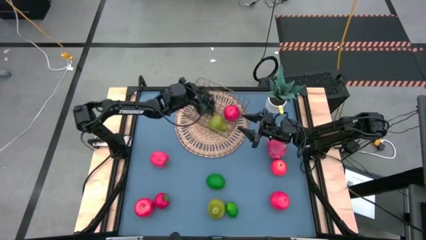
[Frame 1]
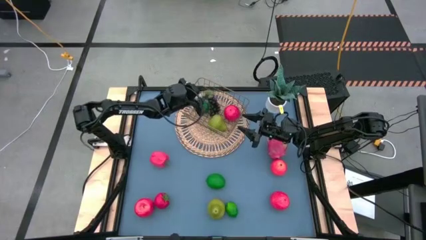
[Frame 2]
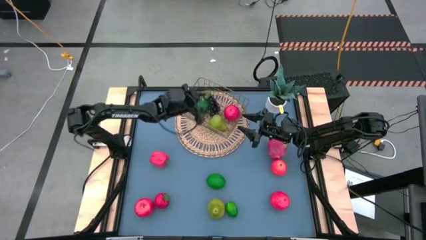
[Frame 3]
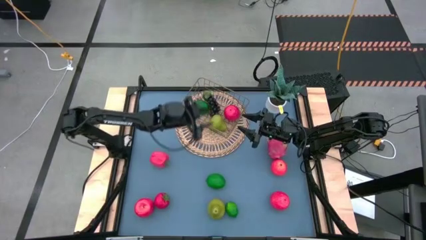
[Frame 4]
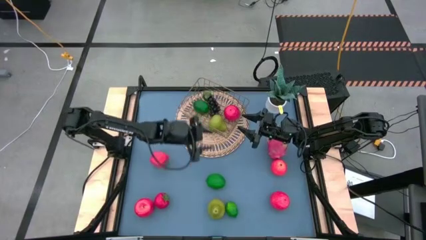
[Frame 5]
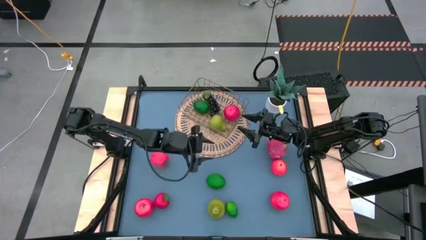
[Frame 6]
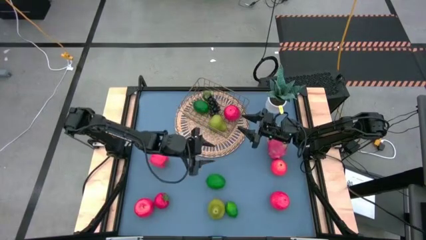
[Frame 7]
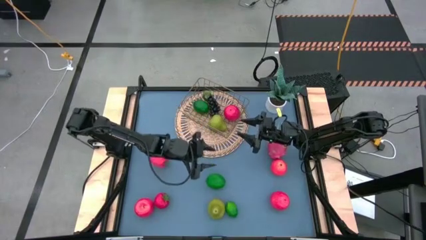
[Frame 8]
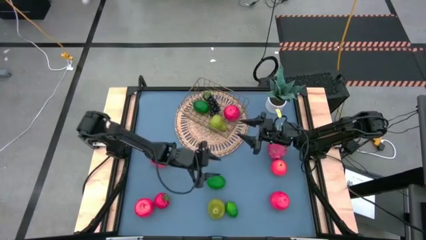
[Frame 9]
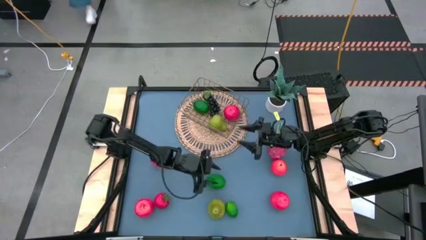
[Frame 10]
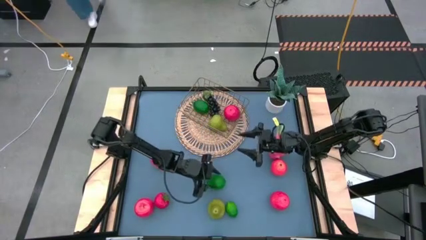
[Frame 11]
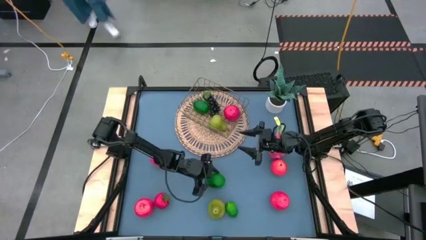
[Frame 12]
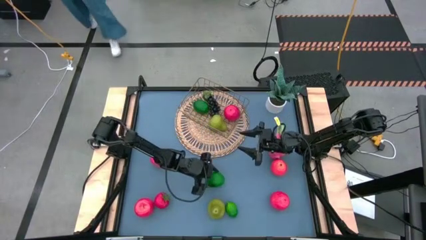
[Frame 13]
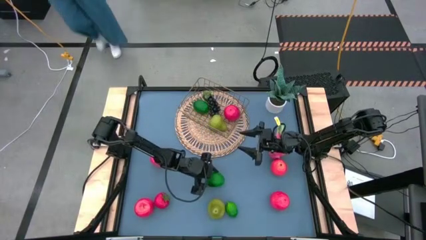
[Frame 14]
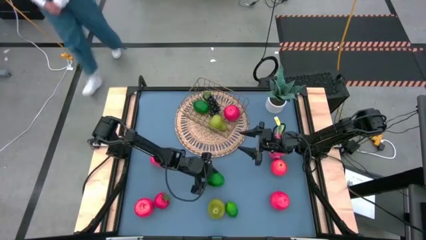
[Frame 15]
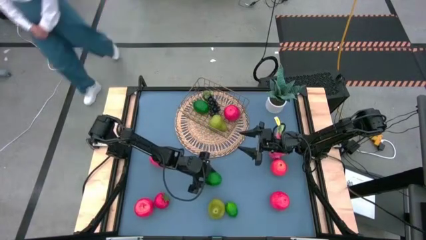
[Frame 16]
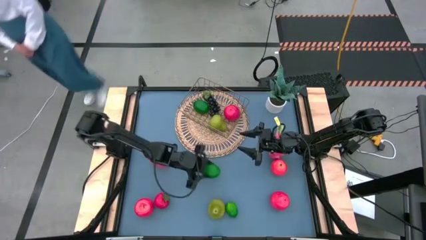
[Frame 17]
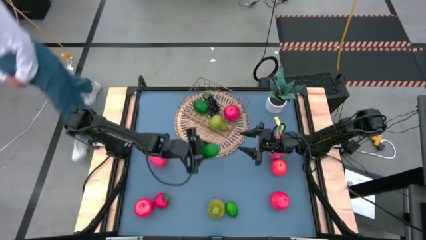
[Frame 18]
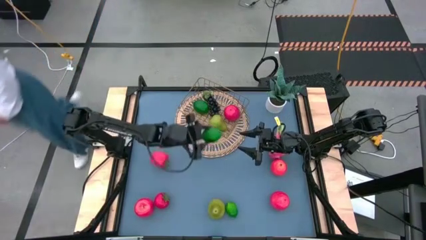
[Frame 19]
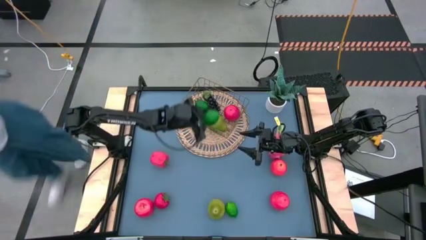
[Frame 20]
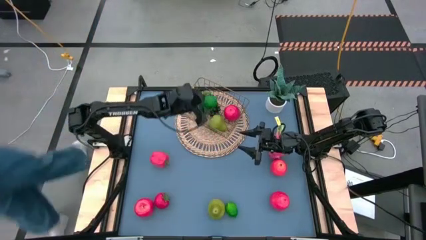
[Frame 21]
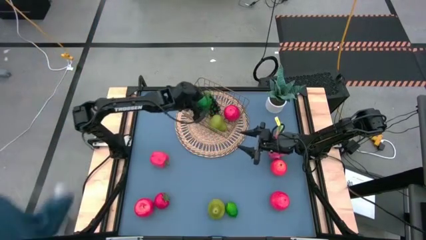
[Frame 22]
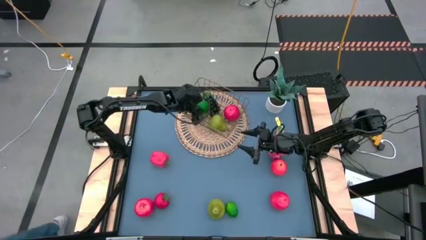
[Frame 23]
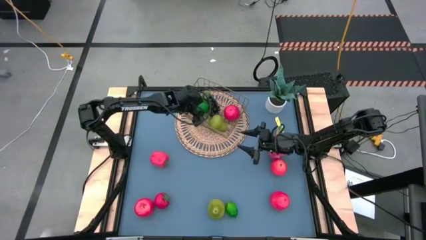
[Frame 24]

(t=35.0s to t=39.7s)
Task: Build produce basket
Put the top green lime into the gold wire basket

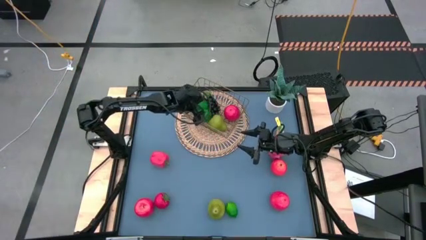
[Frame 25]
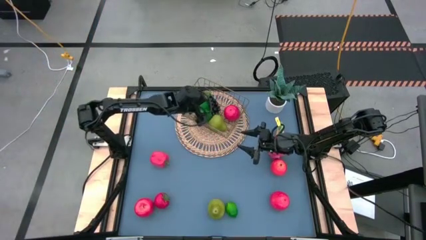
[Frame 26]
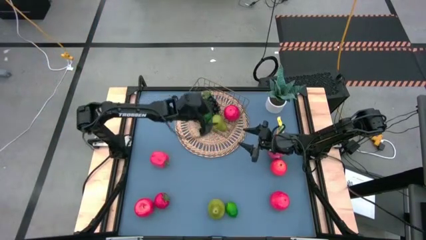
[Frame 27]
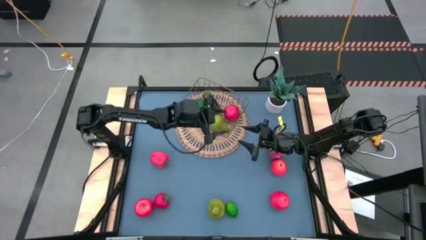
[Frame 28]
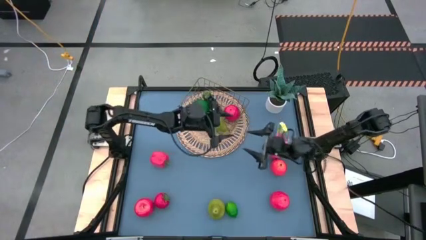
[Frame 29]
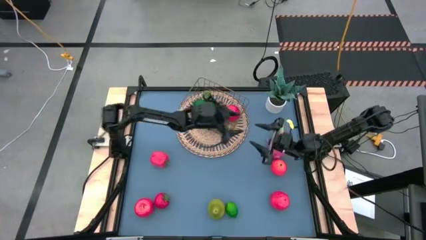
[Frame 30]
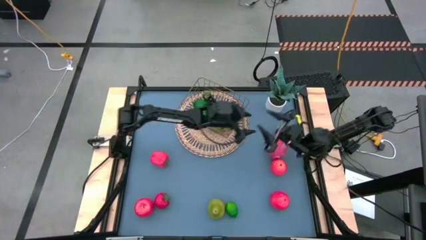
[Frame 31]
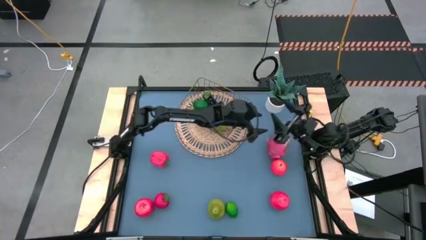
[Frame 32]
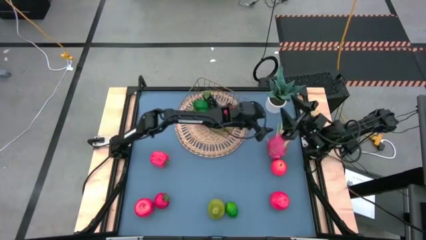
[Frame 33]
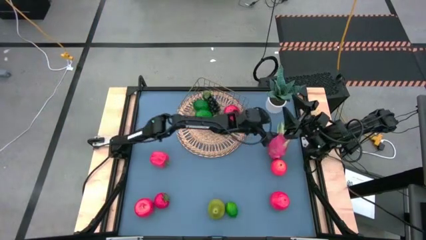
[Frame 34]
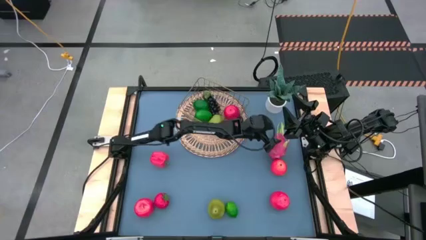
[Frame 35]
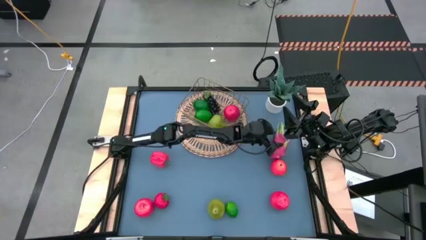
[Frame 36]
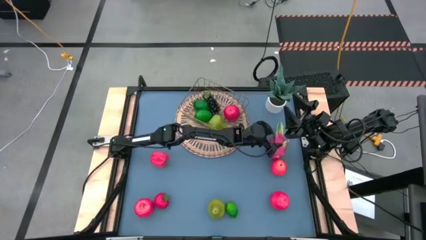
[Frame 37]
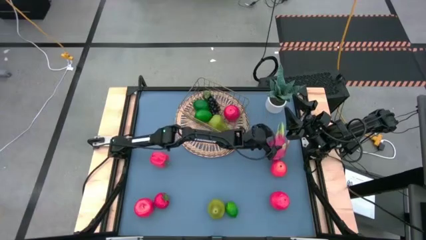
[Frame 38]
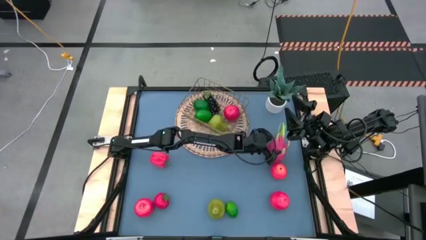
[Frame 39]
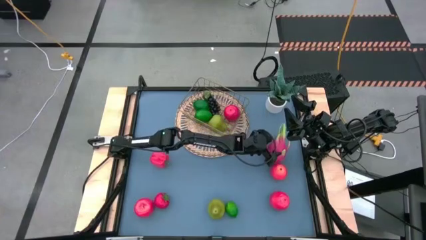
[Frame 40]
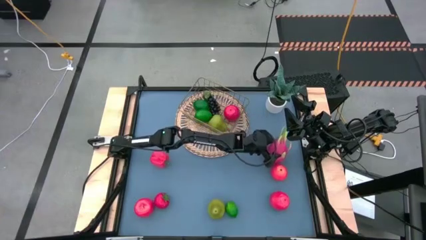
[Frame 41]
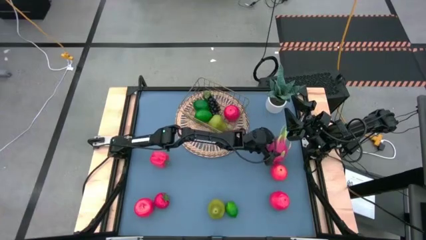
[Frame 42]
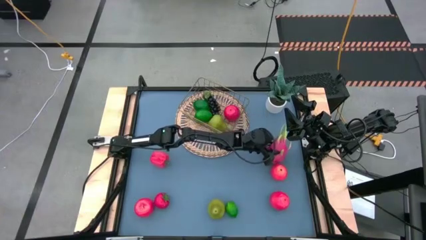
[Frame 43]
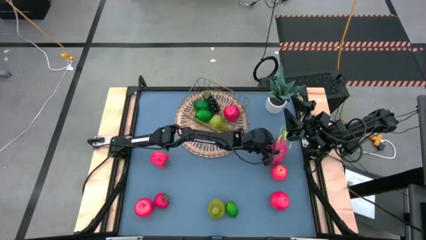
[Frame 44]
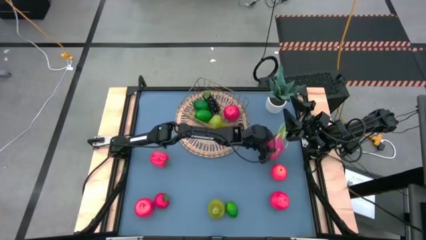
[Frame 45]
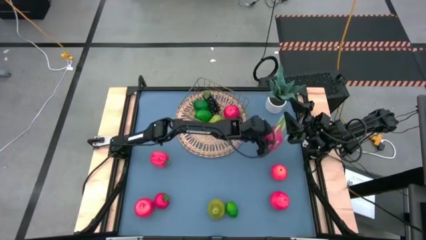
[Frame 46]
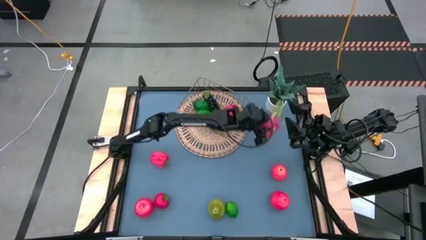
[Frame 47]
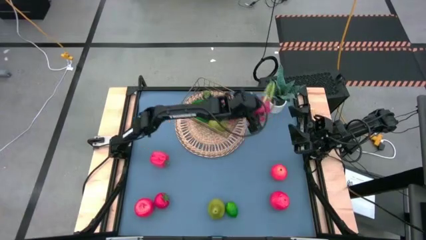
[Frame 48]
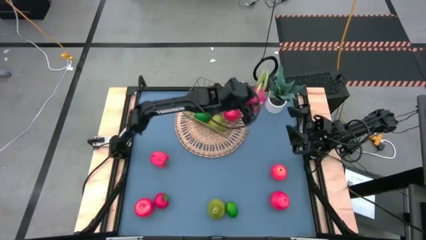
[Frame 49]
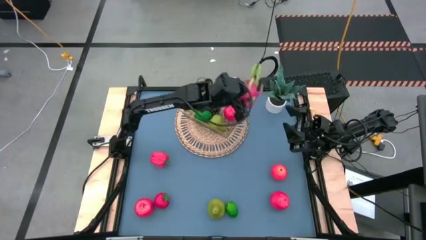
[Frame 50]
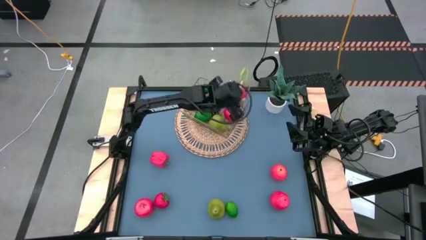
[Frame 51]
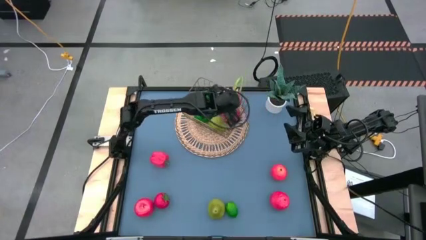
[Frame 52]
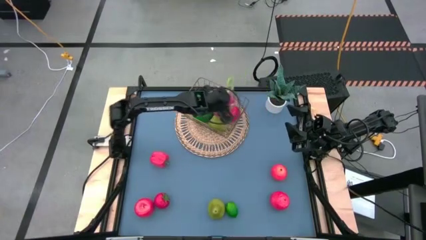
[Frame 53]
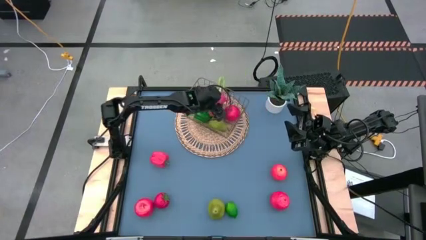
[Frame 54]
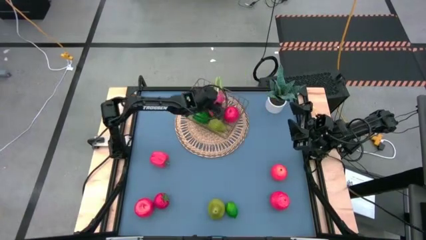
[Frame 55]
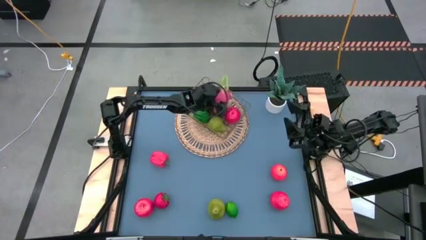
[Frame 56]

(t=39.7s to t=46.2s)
Put the pink dragonfruit into the gold wire basket

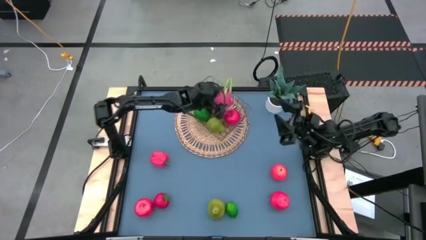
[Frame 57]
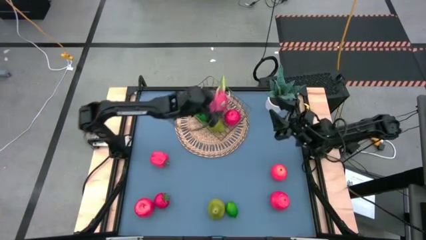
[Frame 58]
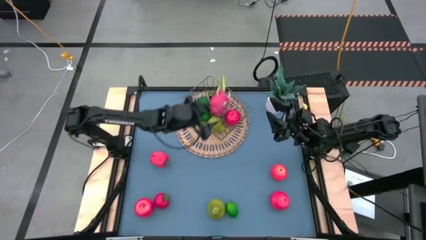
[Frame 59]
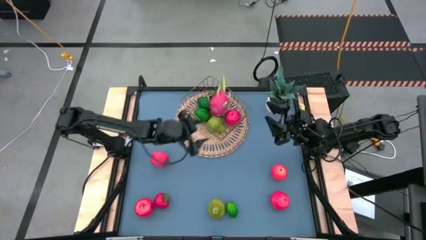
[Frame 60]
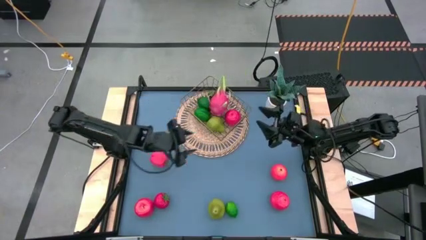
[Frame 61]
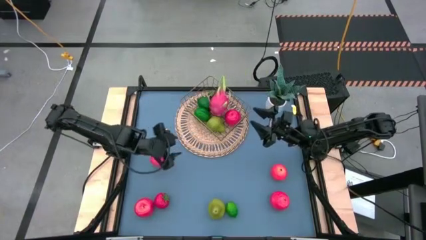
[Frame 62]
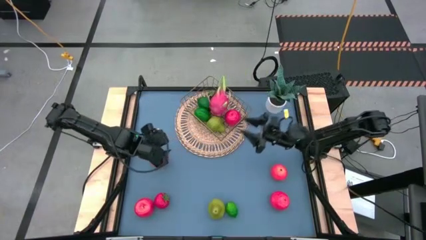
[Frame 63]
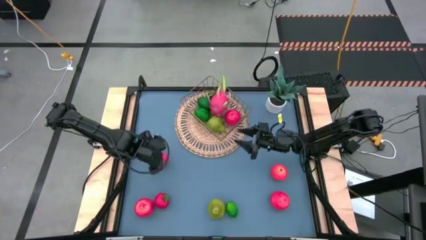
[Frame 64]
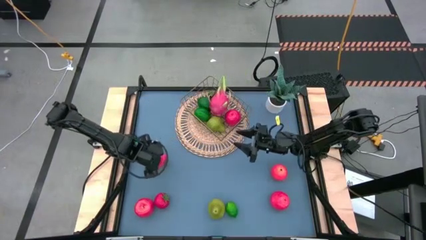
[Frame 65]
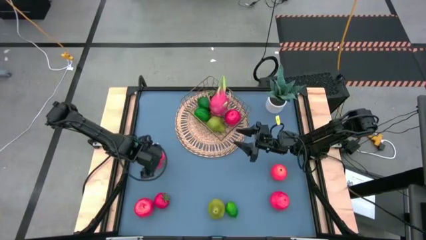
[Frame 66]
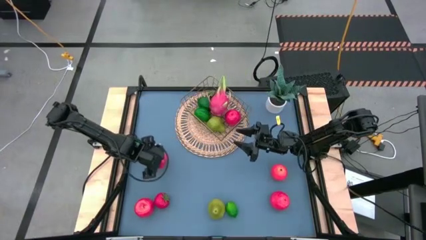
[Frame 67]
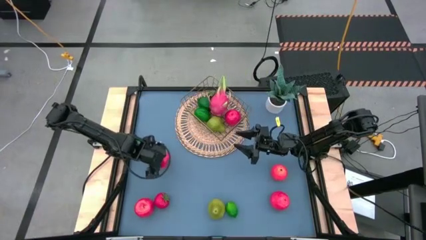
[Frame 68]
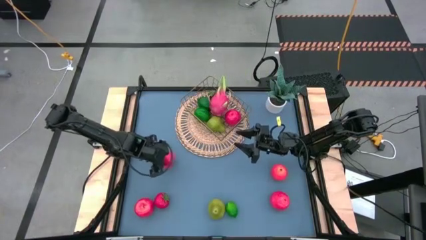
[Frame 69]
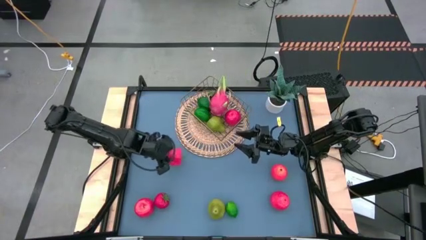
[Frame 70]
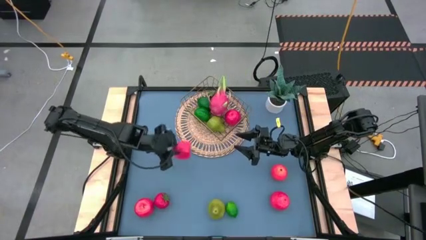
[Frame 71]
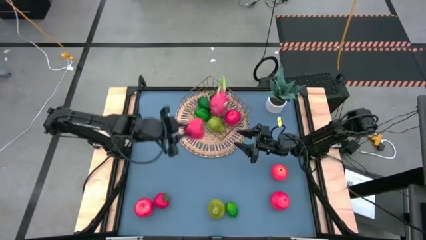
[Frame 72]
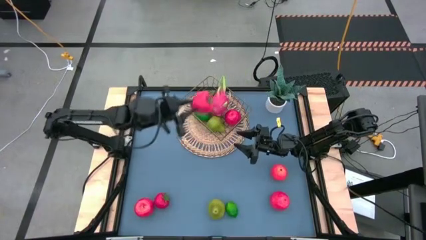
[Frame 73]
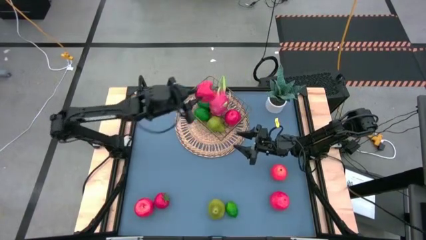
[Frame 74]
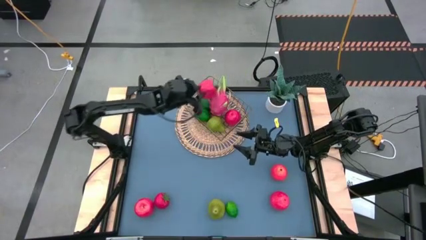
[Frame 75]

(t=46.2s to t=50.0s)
Put the red bell pepper into the gold wire basket

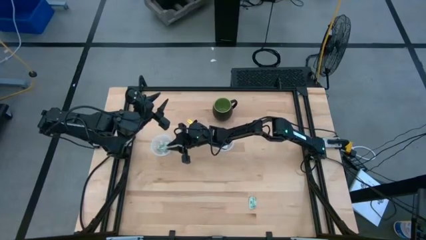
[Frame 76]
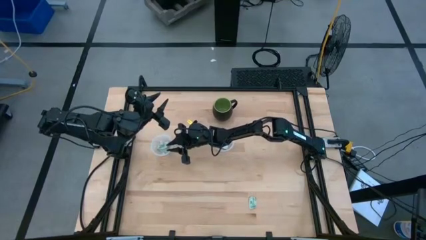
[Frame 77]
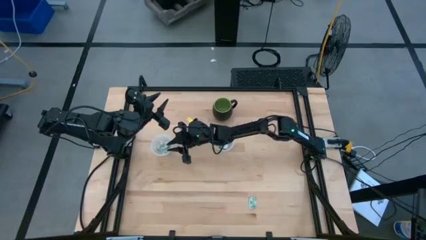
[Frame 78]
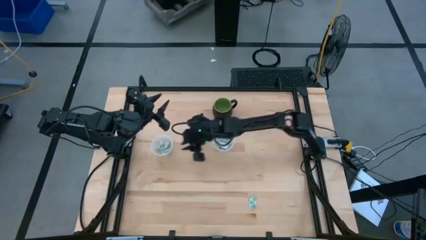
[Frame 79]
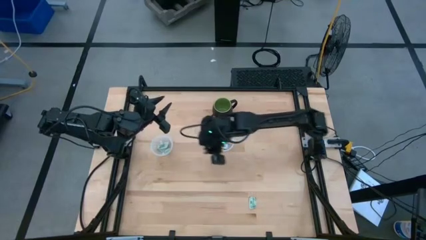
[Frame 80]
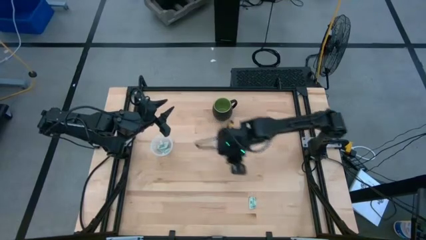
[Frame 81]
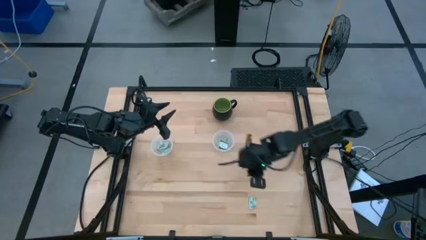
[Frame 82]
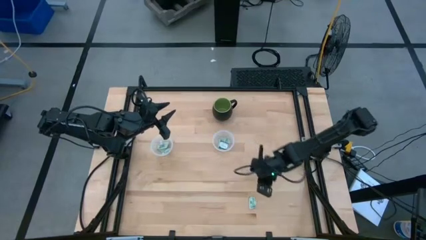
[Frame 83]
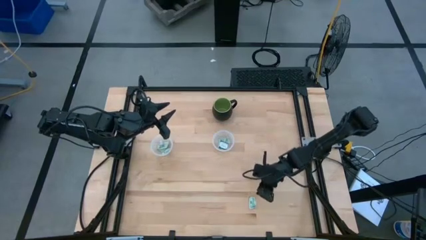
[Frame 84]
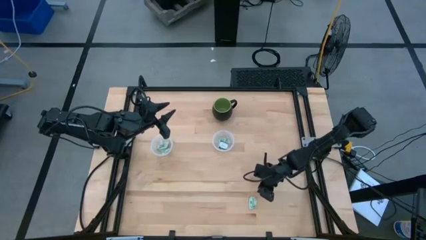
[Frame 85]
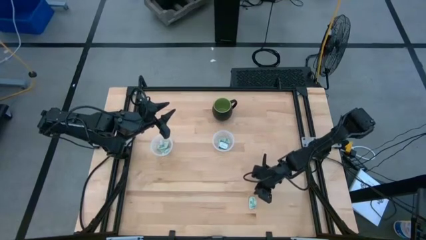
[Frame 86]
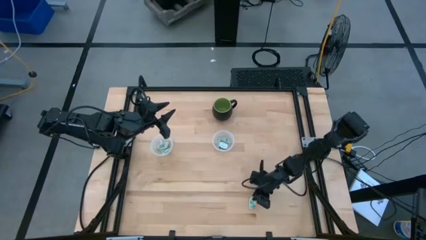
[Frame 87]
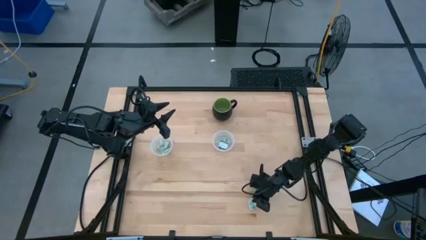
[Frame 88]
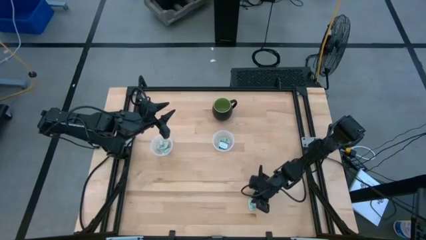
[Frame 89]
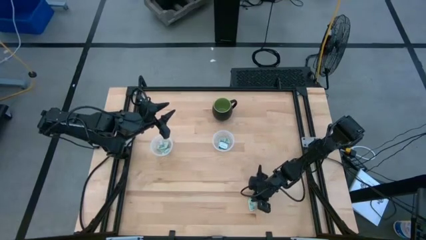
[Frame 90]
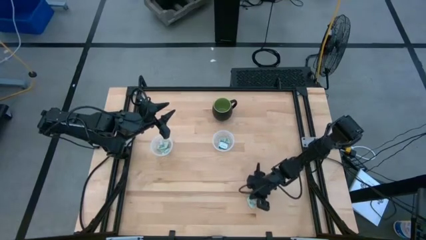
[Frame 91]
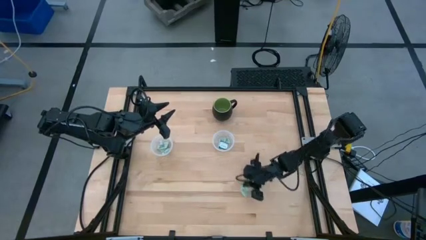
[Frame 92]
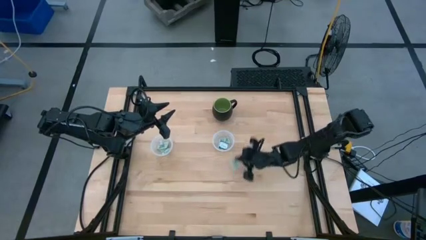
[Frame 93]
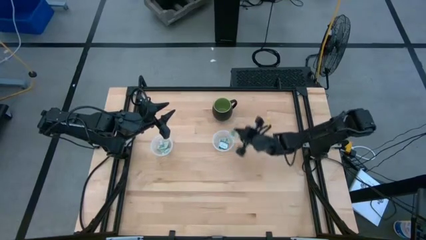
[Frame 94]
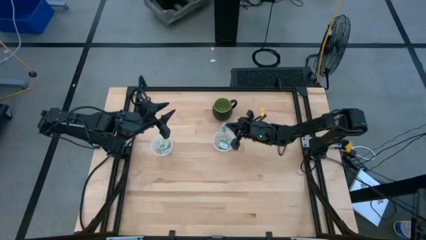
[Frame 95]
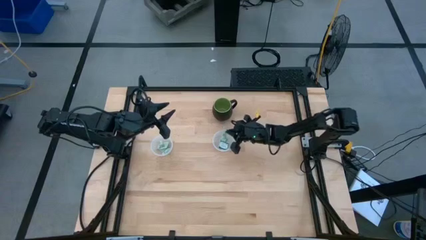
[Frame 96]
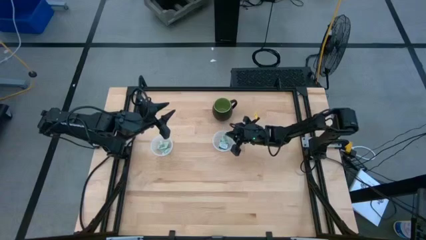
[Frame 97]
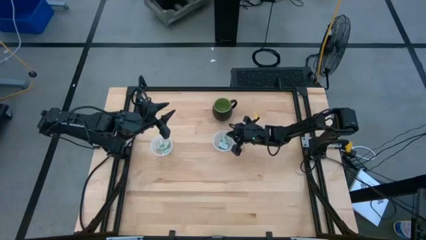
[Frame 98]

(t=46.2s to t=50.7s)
Task: Pick and place Stevia / Truvia into bins
Put the white stevia packet into the right transparent container
